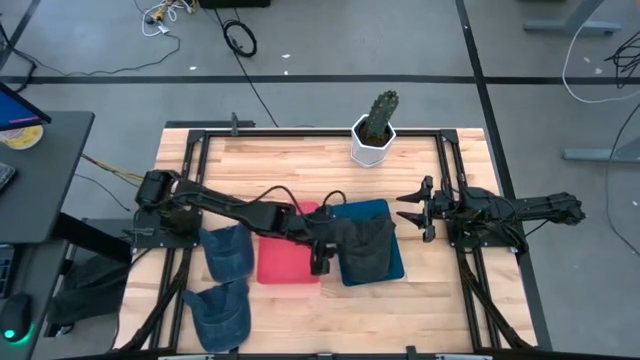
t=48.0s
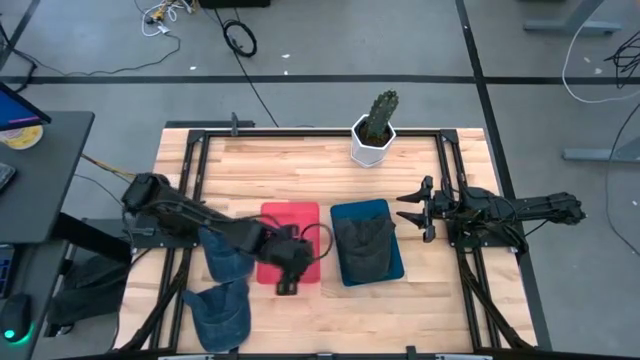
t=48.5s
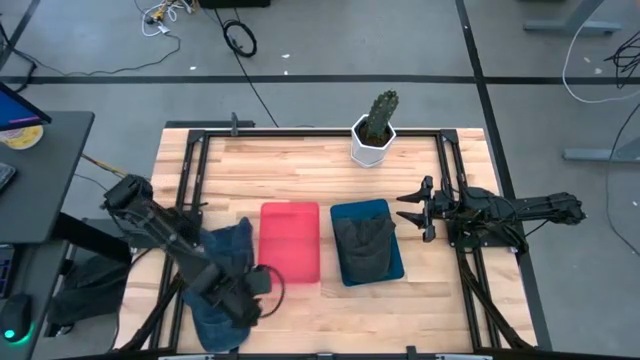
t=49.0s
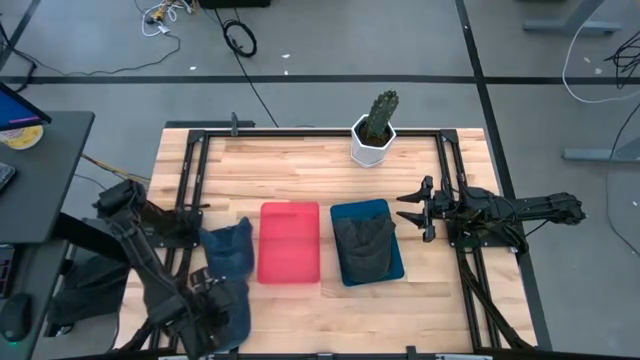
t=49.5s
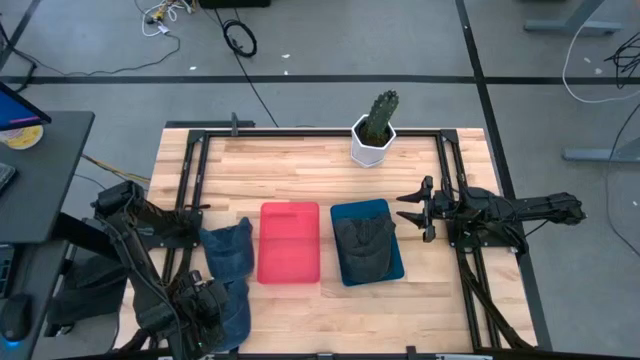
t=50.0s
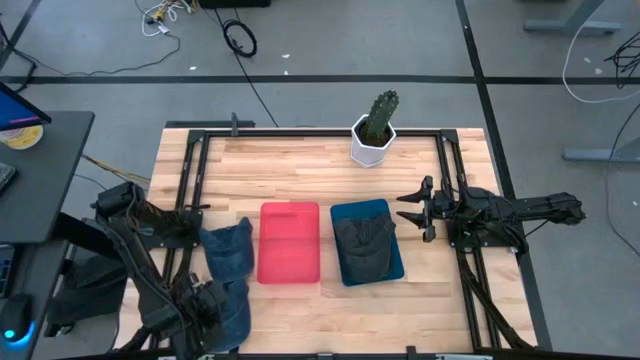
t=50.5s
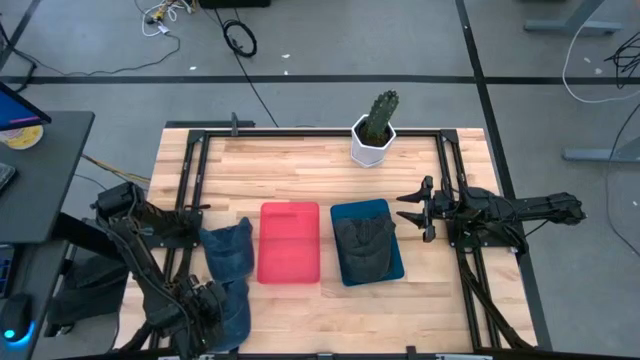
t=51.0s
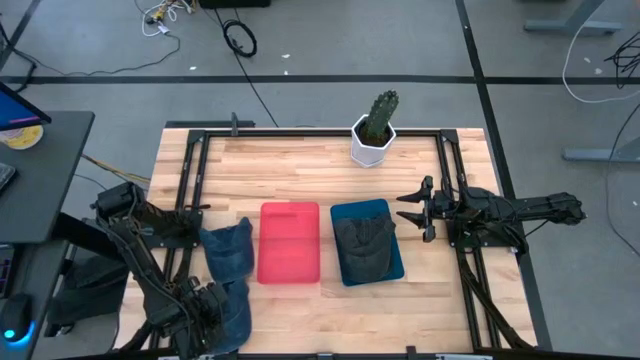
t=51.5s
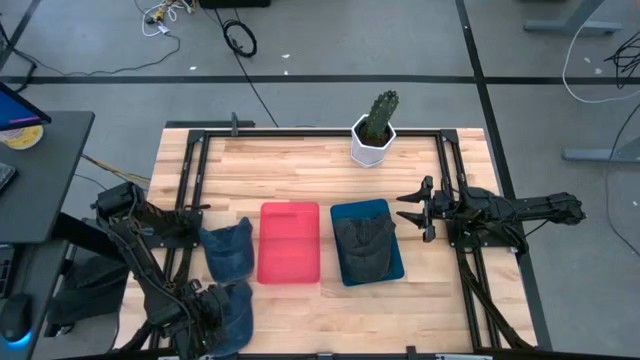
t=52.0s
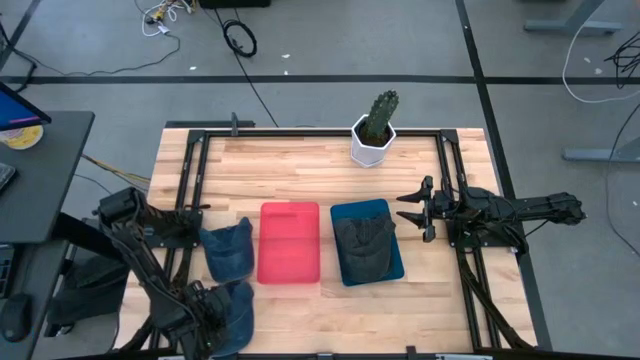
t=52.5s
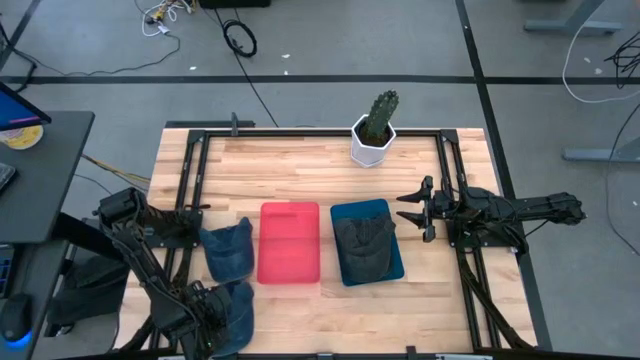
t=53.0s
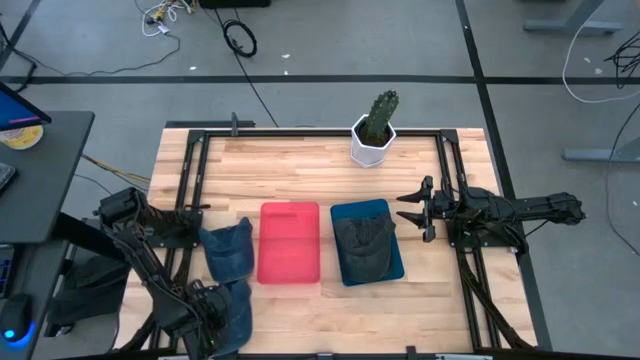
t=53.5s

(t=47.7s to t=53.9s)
Task: Pick & Place hat
Put the bottom blue cap into the pink bin

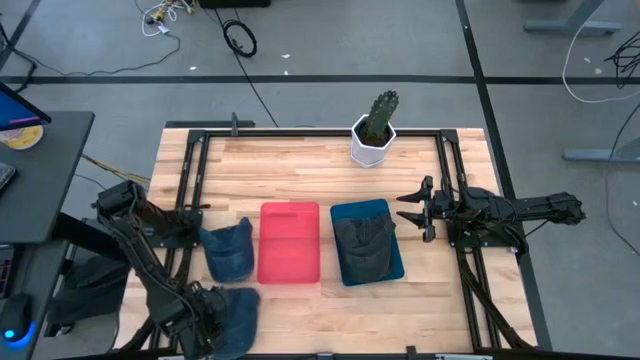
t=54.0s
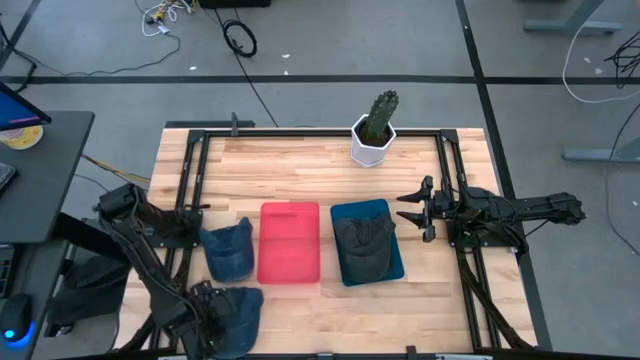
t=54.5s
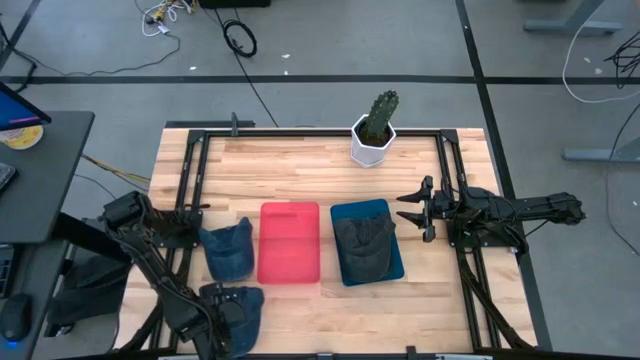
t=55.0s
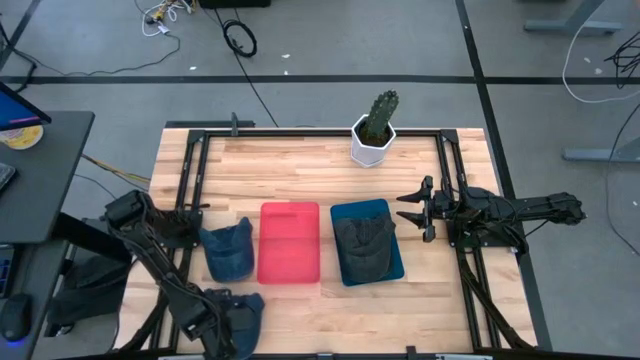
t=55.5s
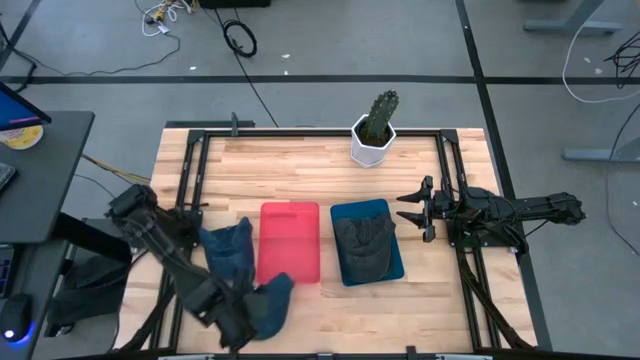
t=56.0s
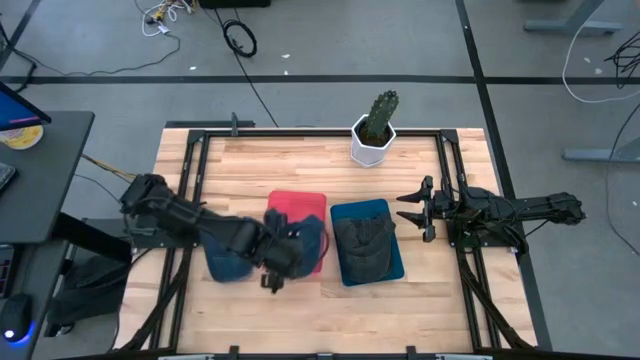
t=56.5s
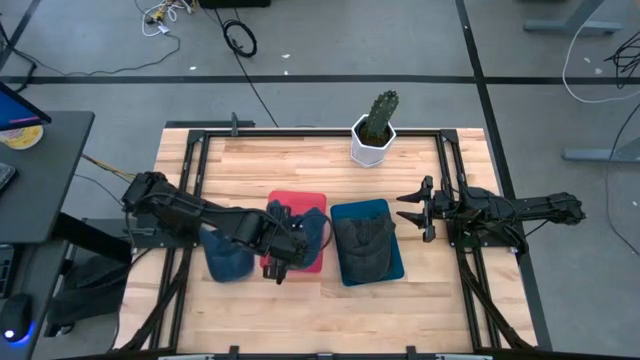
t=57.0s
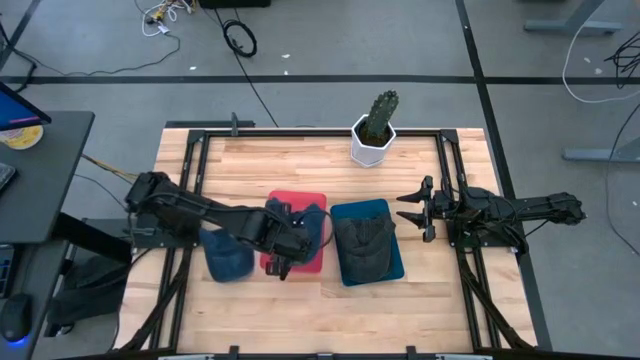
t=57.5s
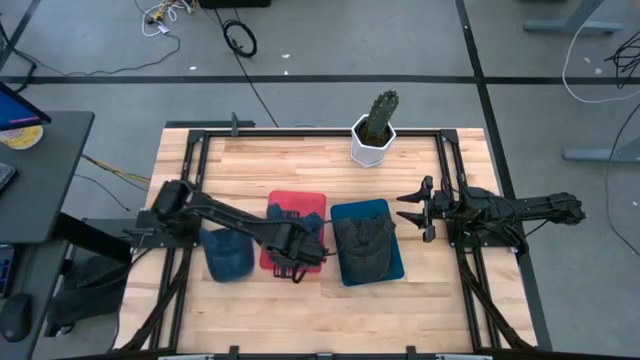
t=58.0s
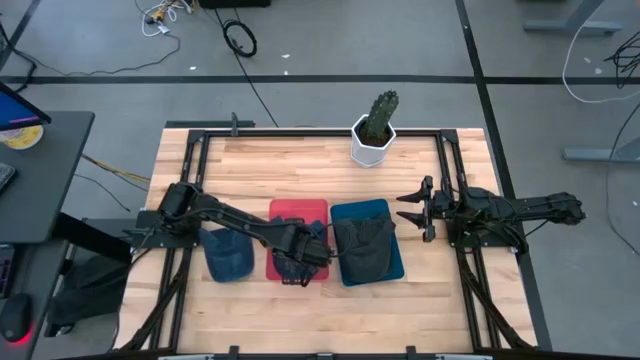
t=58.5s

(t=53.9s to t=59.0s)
Put the bottom blue cap into the pink bin

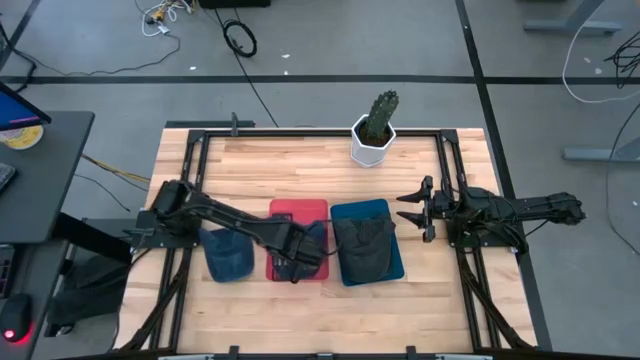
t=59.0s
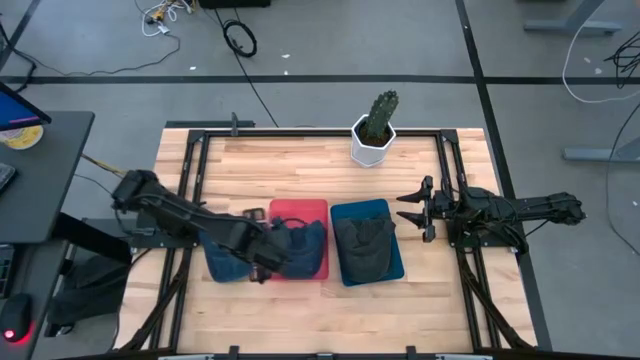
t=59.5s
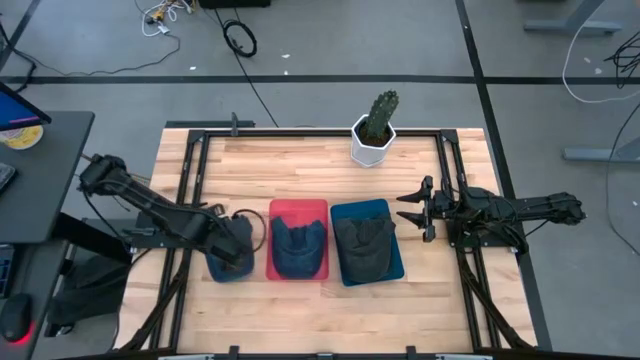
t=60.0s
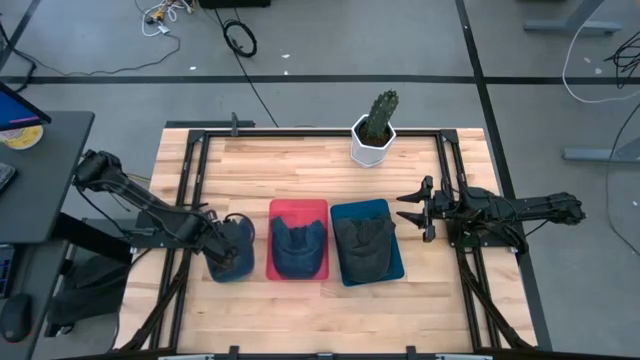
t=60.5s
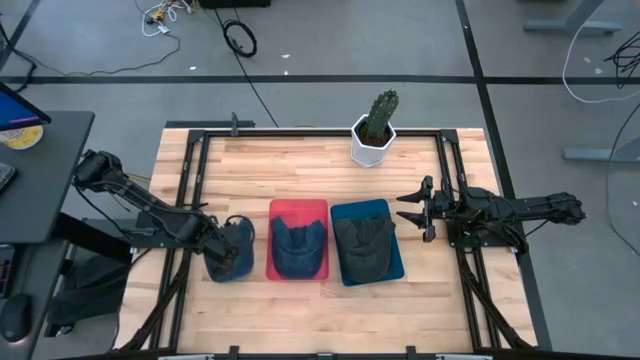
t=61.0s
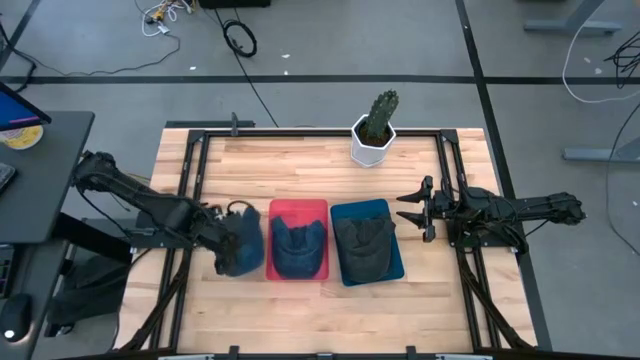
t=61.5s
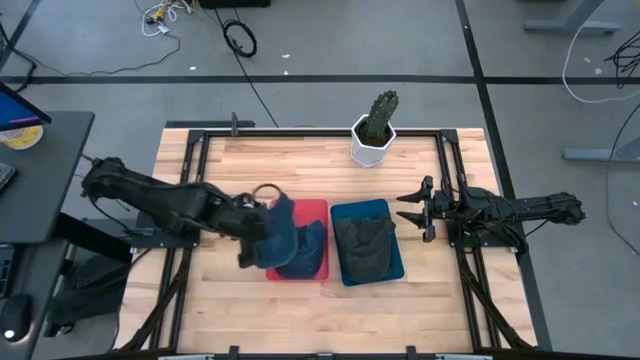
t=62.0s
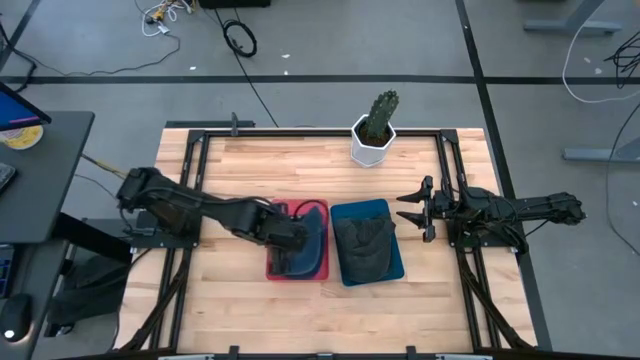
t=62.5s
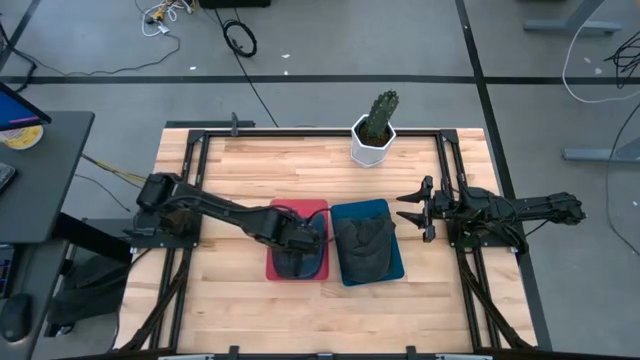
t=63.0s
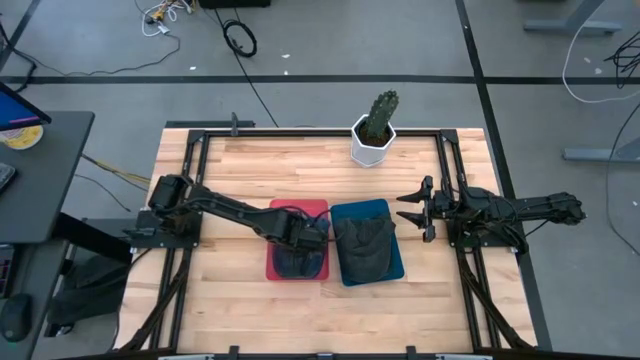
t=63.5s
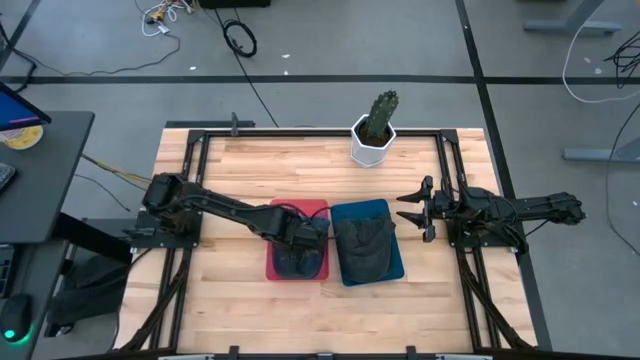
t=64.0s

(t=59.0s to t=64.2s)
Put the blue cap into the pink bin

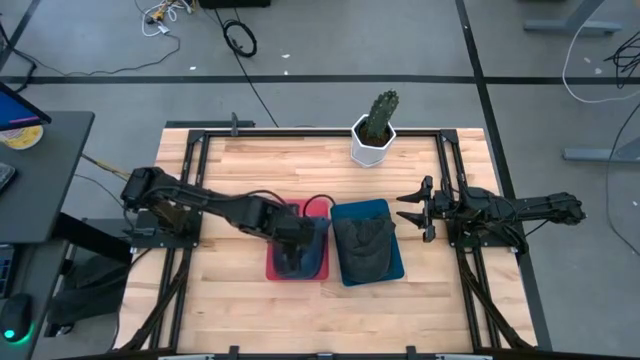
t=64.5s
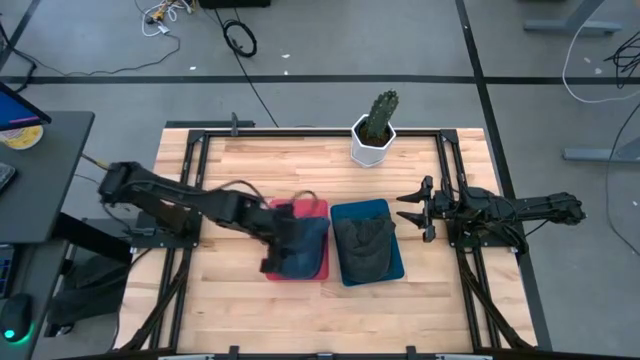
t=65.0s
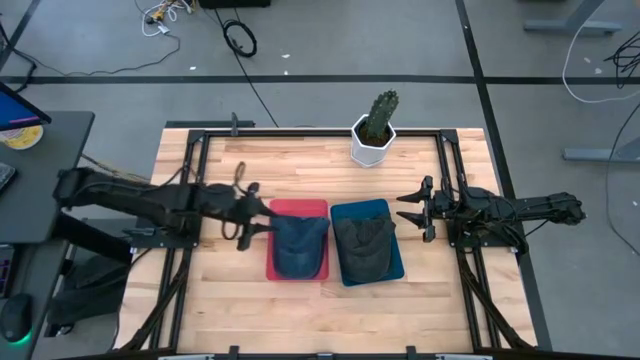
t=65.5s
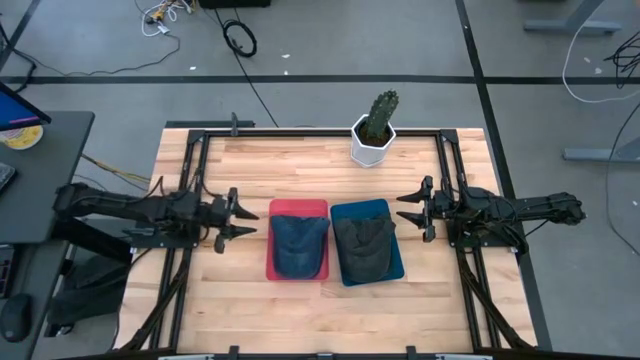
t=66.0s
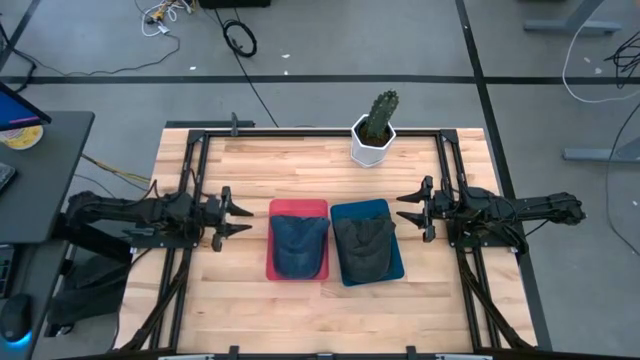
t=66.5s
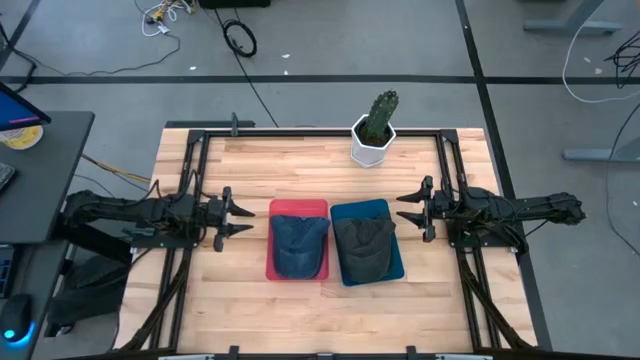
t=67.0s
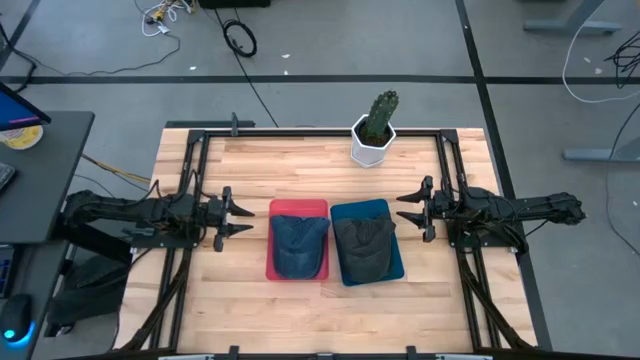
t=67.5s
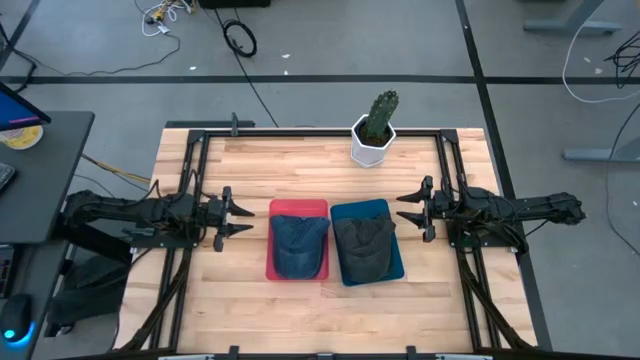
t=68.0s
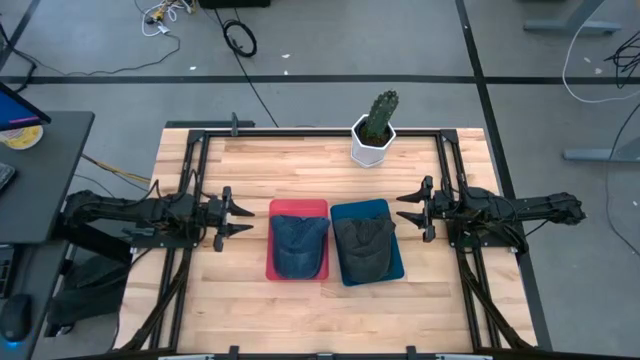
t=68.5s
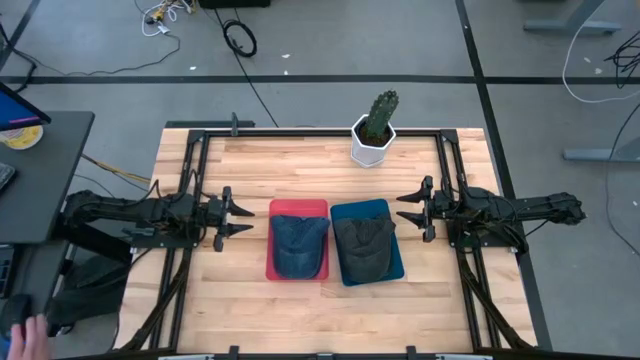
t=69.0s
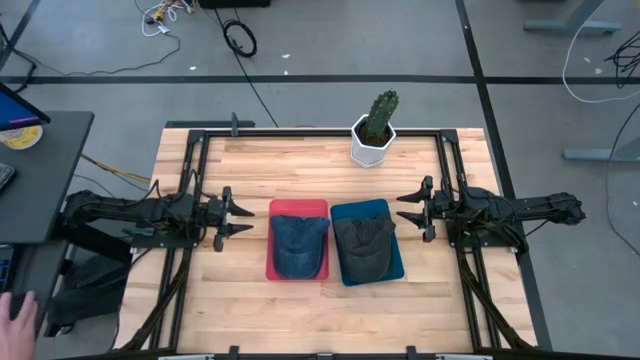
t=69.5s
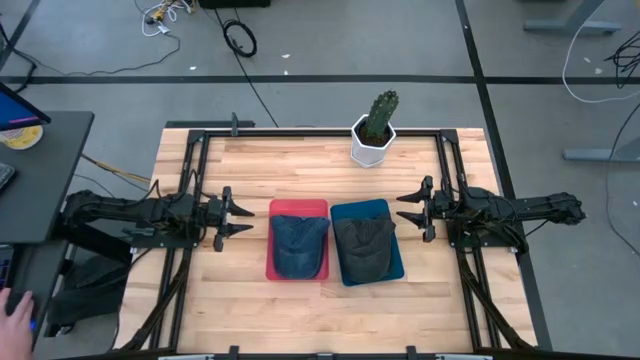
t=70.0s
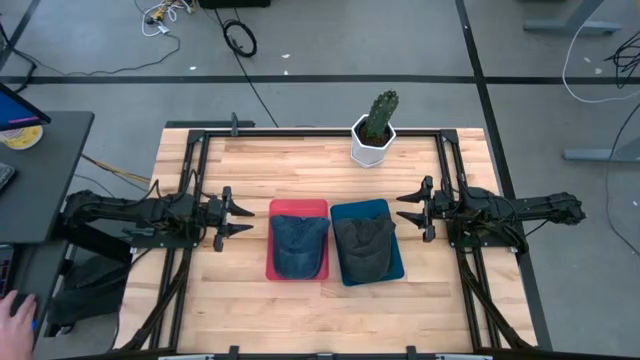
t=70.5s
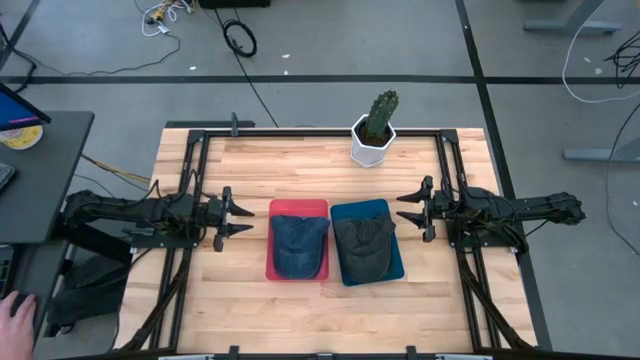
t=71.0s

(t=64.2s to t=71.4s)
Return to Home Position
